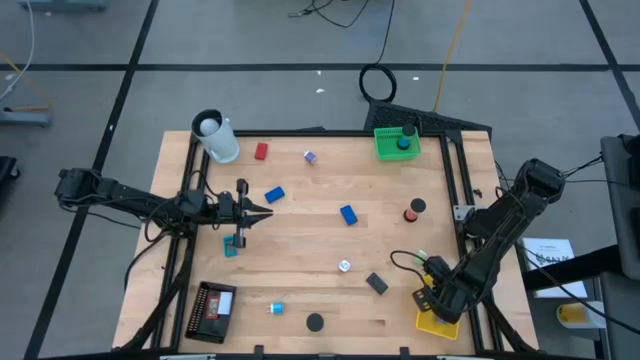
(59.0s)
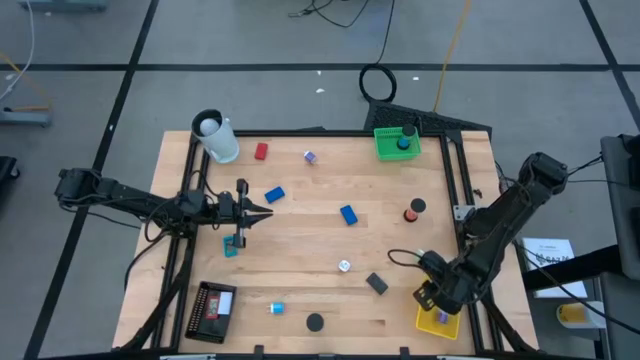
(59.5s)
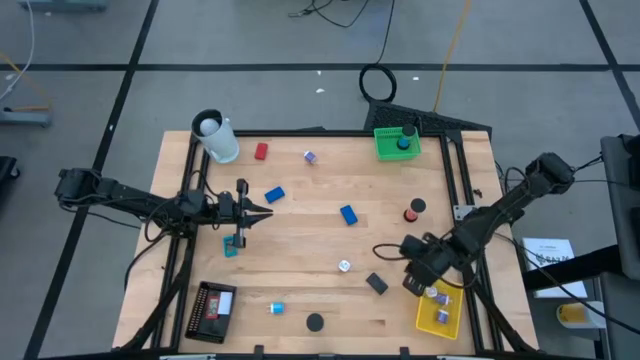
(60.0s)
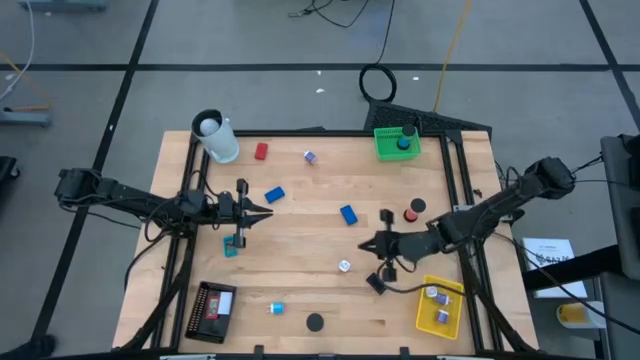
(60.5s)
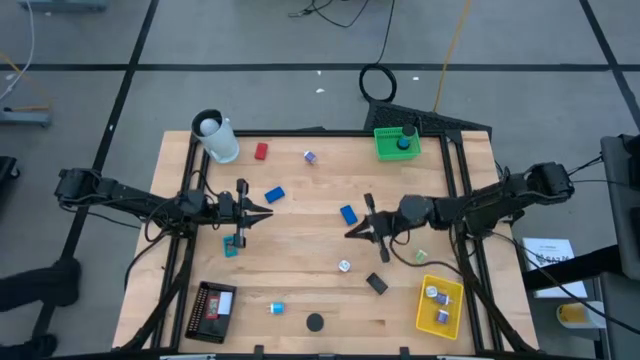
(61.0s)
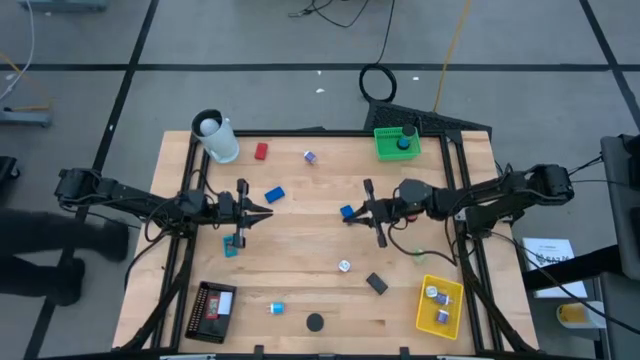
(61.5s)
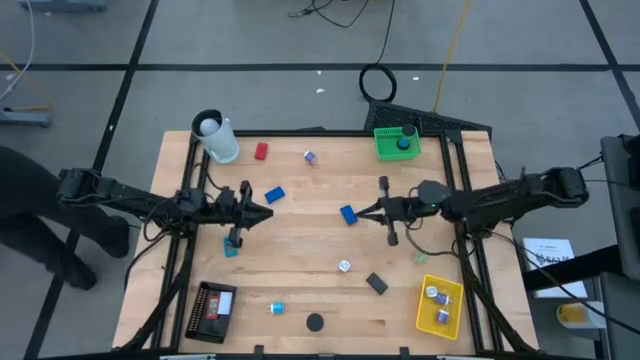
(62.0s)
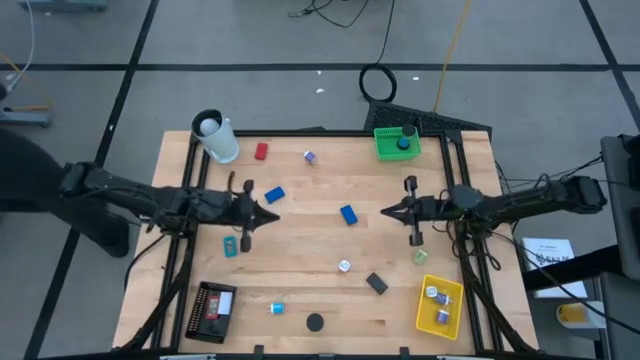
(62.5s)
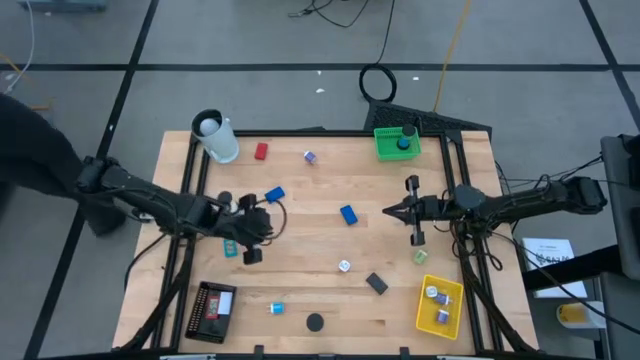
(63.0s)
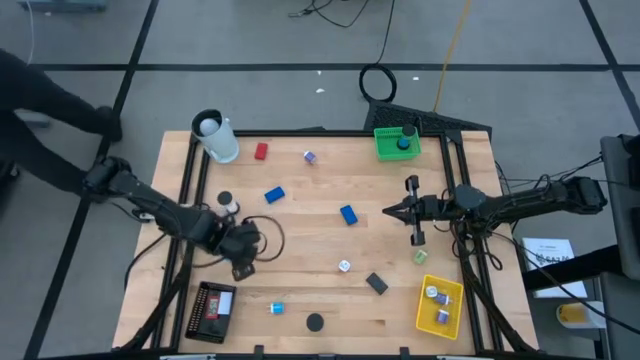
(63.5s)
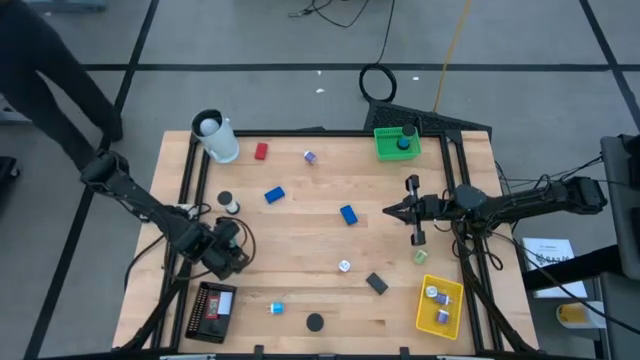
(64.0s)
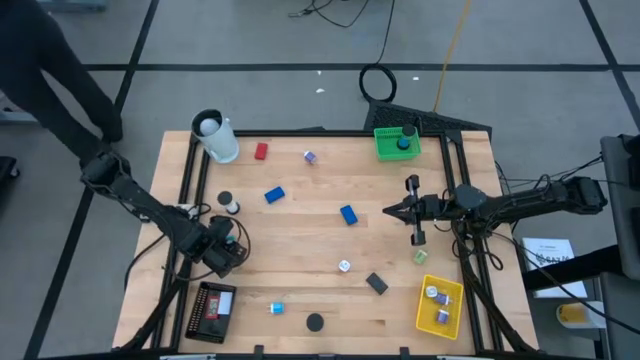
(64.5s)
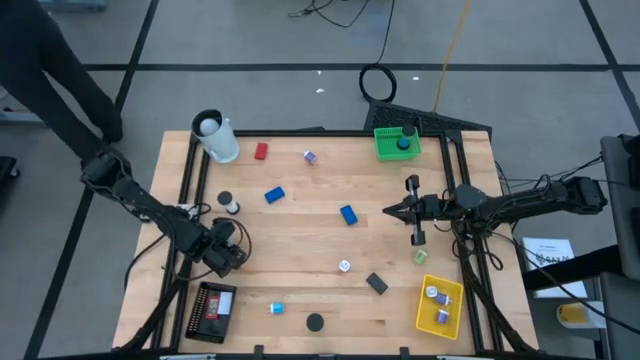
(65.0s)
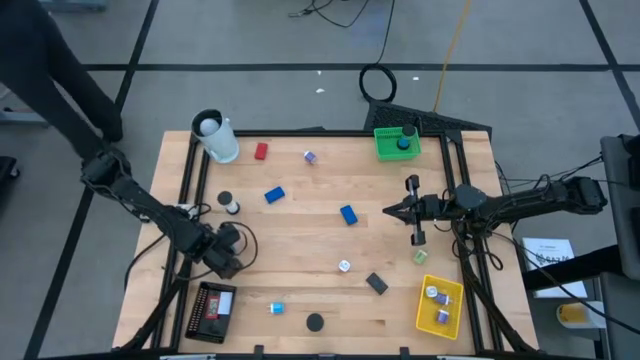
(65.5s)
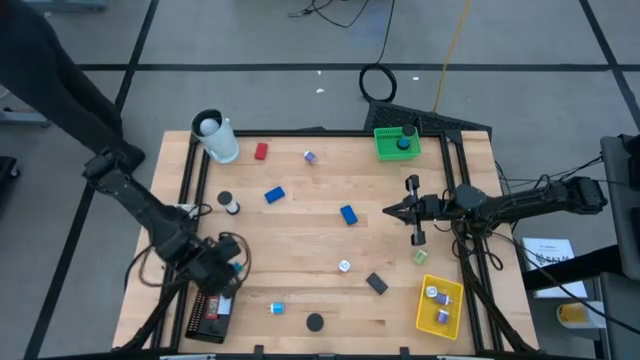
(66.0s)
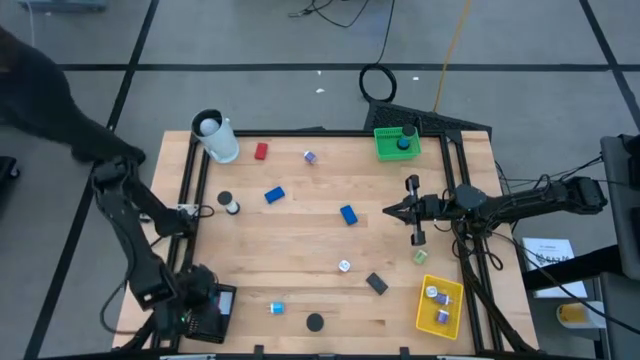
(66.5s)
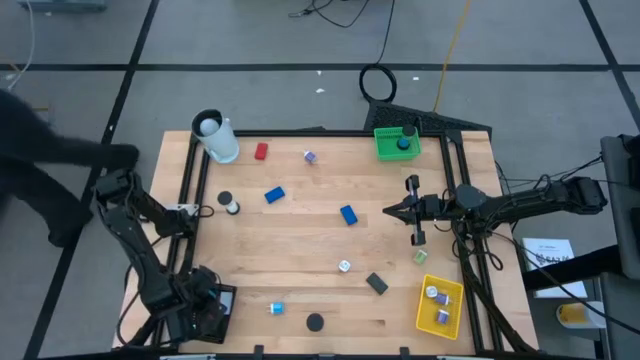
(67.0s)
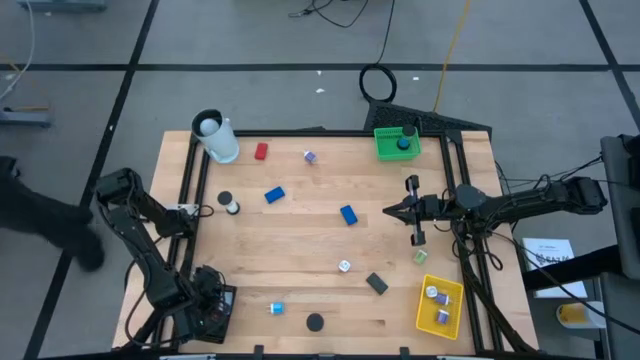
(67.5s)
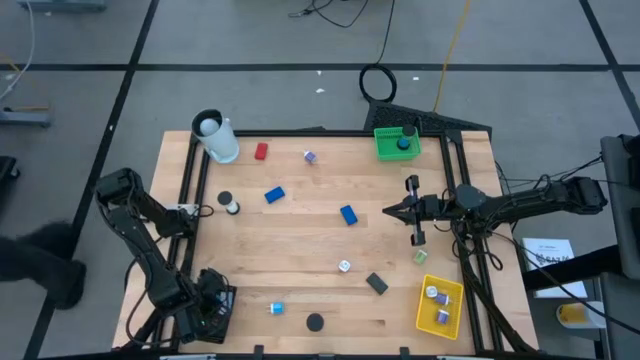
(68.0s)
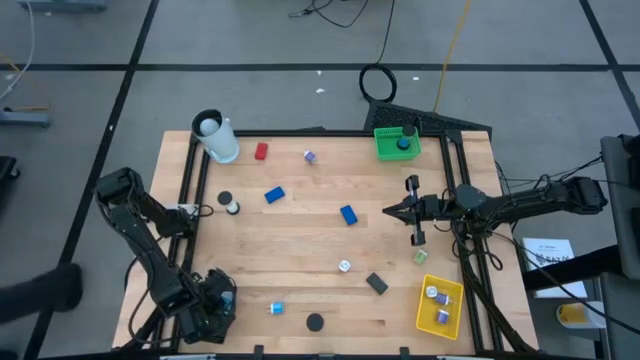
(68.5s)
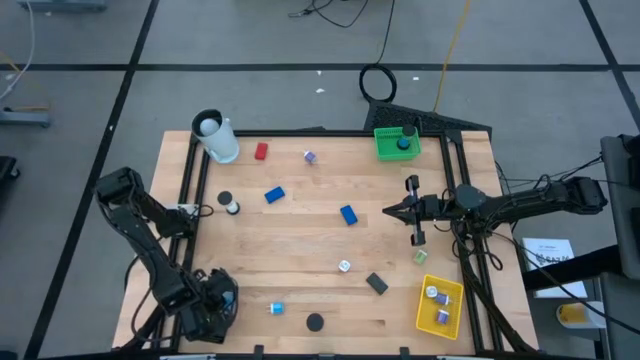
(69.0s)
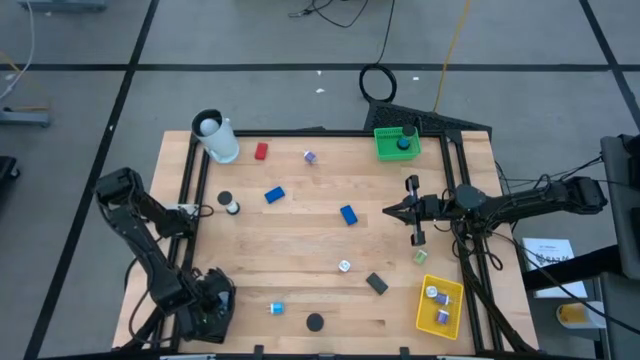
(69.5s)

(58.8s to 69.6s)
Task: Pick & Place Office items
Put the light blue digital clock into the black bin

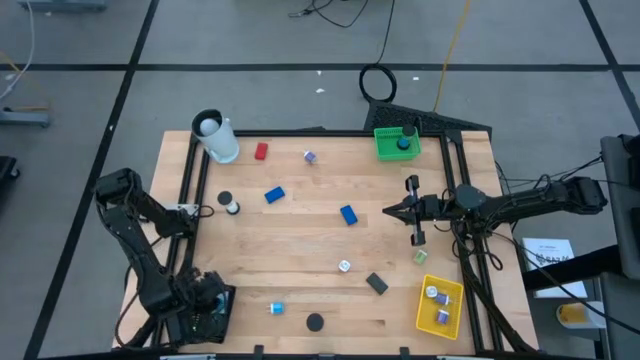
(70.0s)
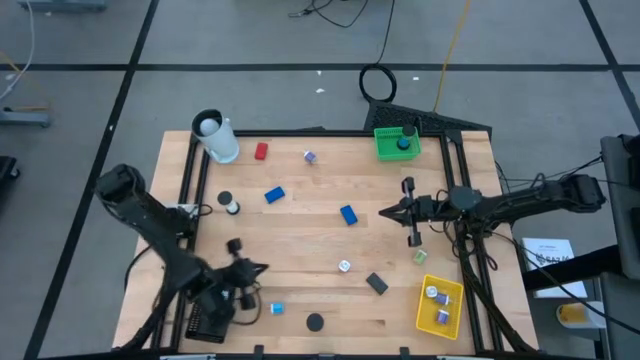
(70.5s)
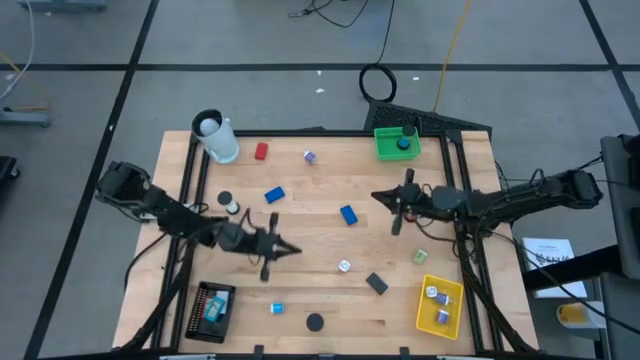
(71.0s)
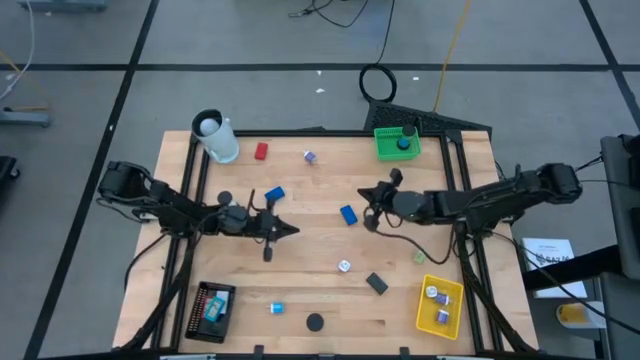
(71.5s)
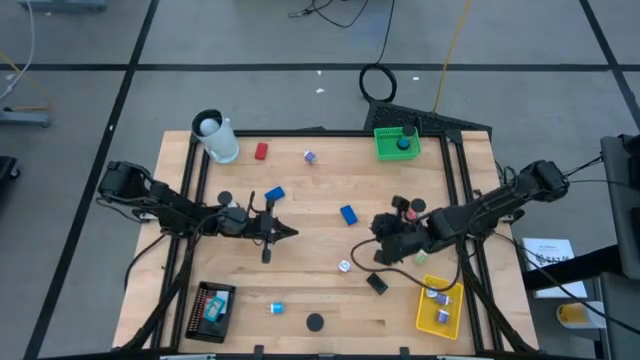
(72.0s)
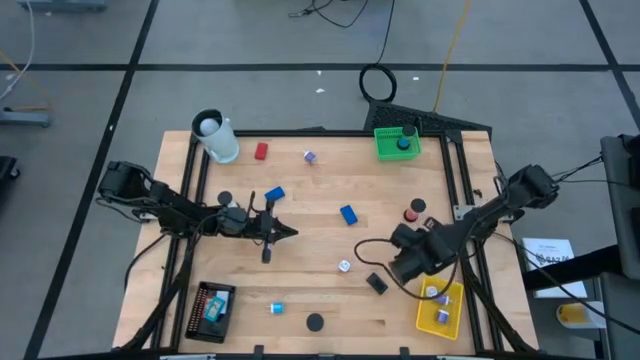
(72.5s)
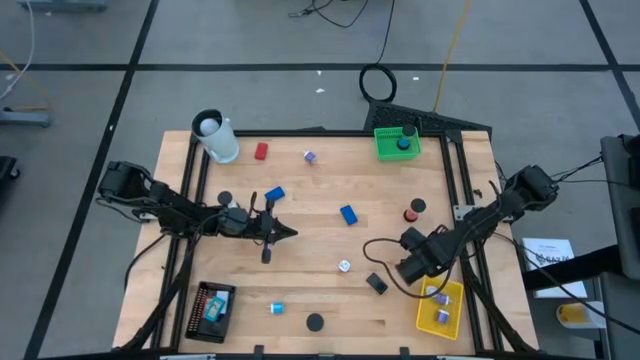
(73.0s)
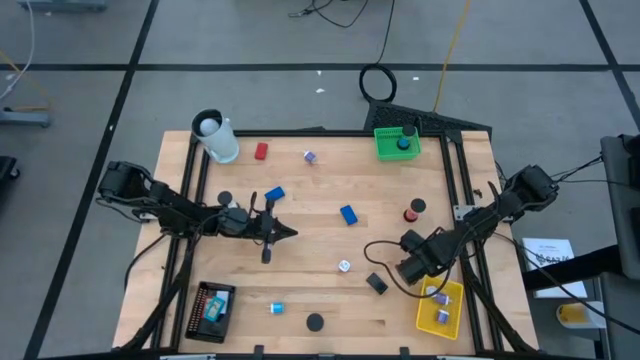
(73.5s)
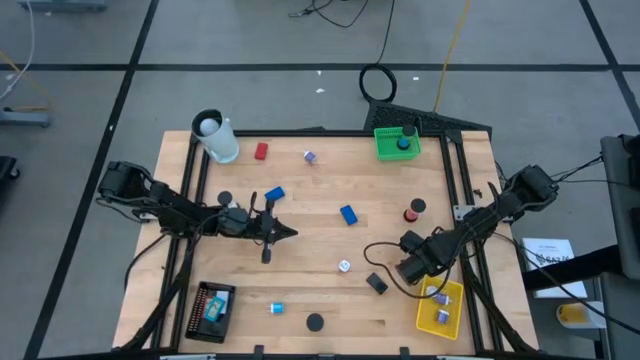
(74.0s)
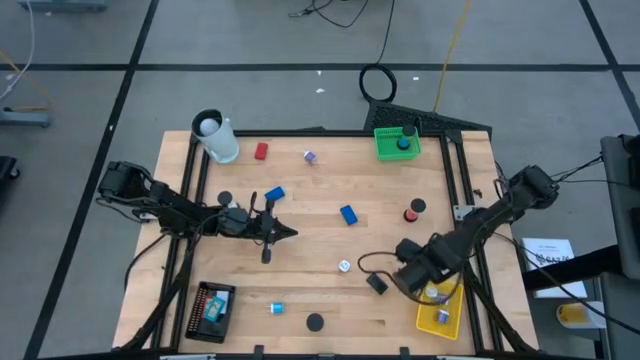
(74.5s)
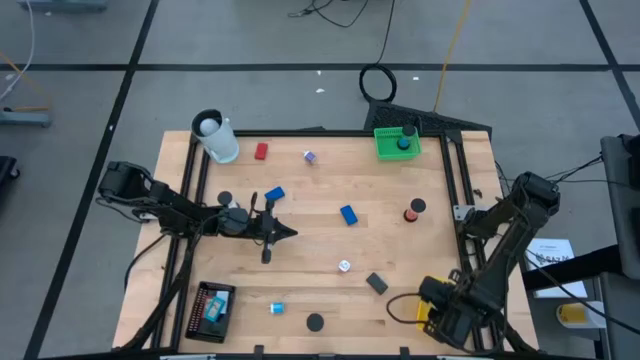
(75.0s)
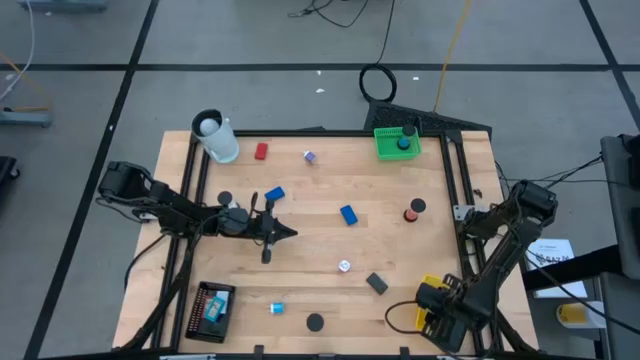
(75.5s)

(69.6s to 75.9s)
Put the green charger adapter into the green bin

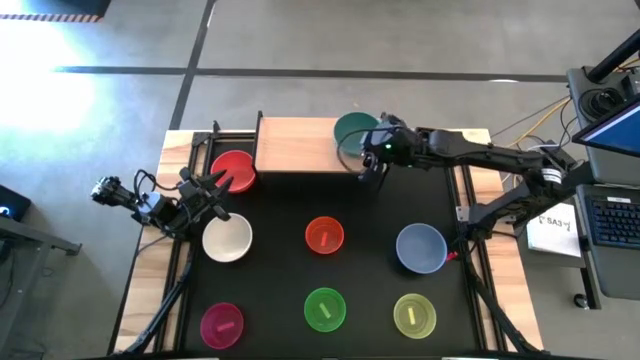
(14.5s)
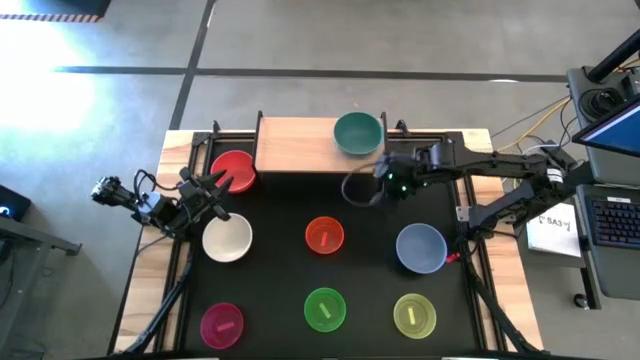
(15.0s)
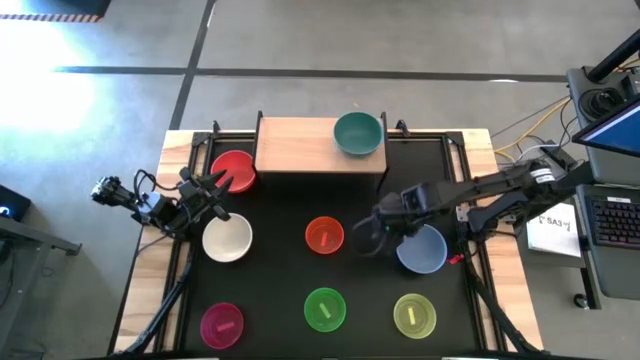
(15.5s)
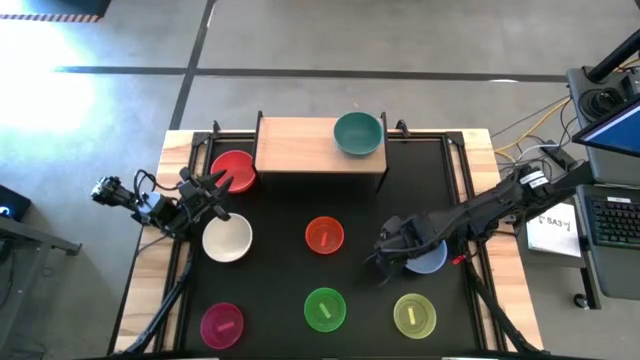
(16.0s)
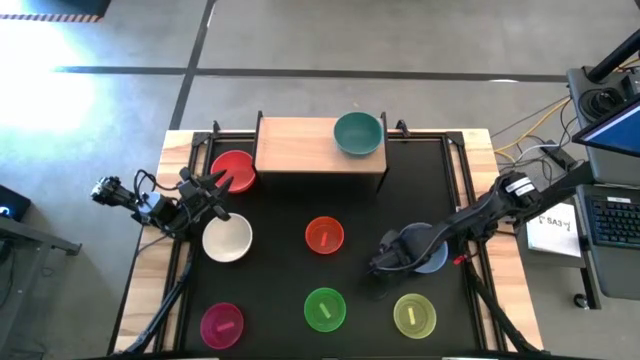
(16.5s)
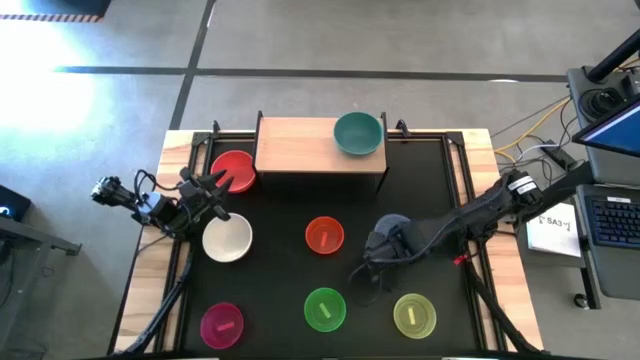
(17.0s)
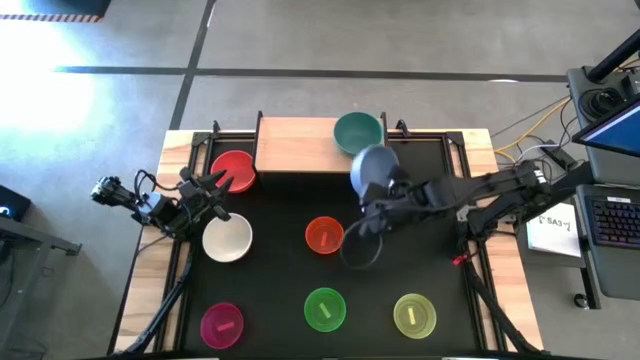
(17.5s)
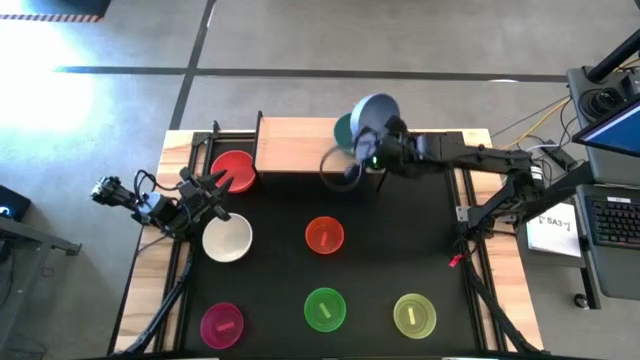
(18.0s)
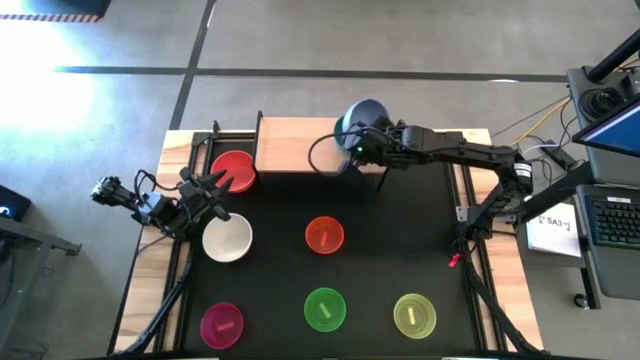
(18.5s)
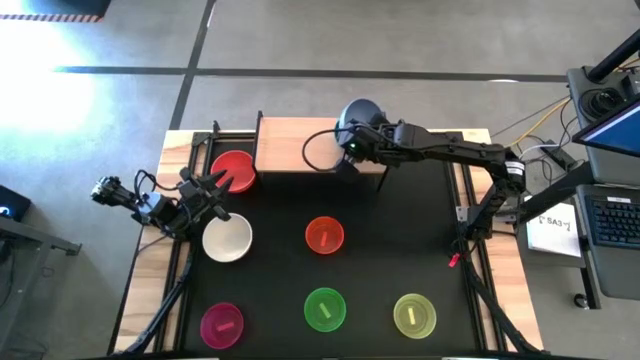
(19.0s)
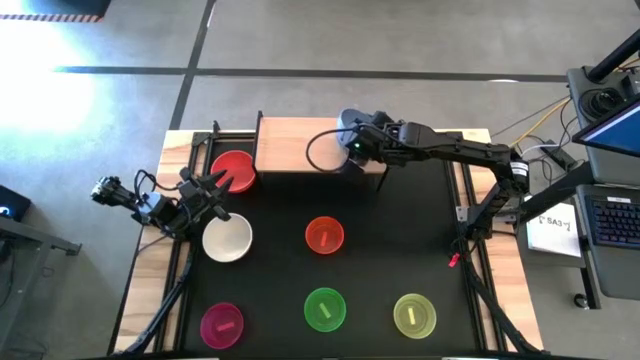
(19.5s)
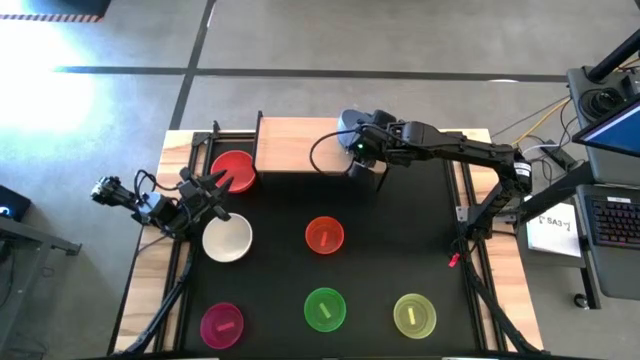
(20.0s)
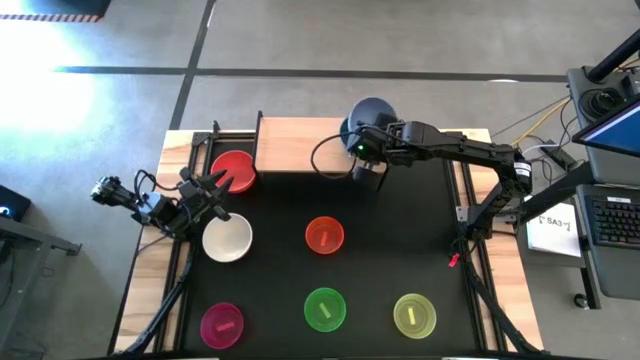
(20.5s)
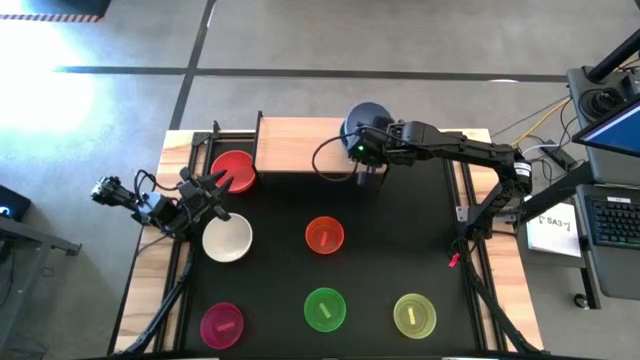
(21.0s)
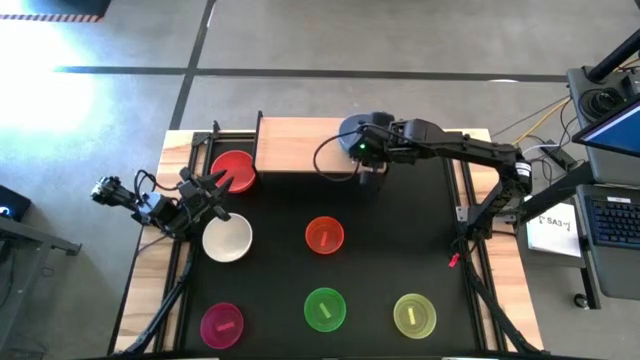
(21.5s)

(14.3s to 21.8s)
Task: Place and stack bowls onto a shelf
Stack the blue bowl on top of the dark blue bowl on the shelf
